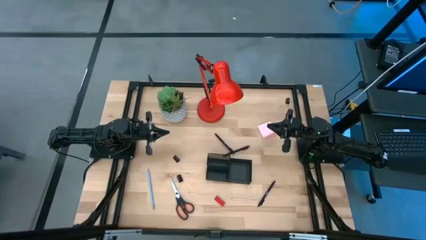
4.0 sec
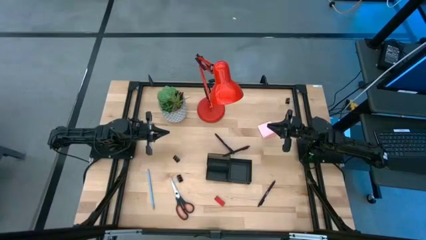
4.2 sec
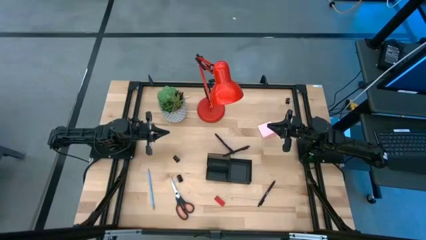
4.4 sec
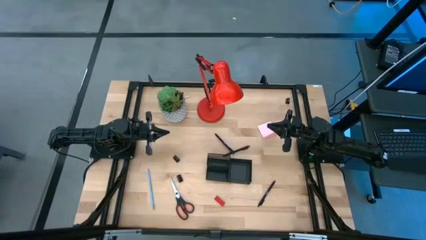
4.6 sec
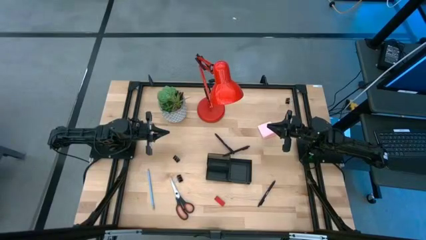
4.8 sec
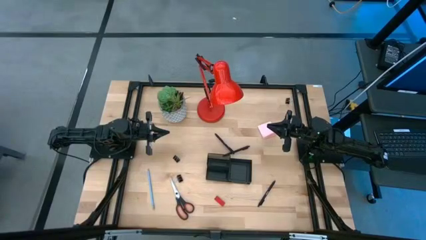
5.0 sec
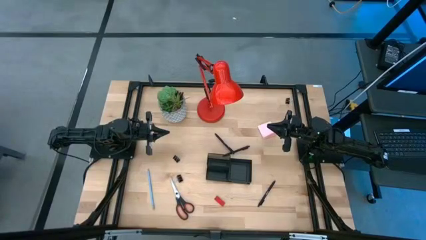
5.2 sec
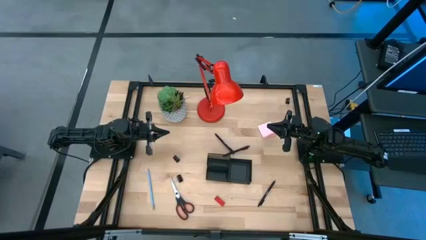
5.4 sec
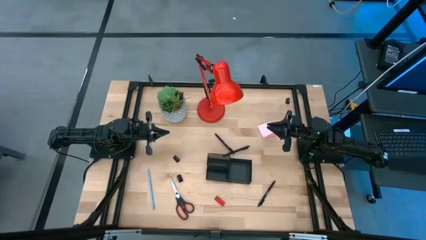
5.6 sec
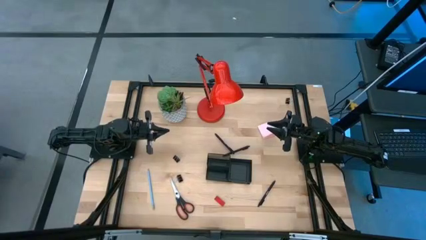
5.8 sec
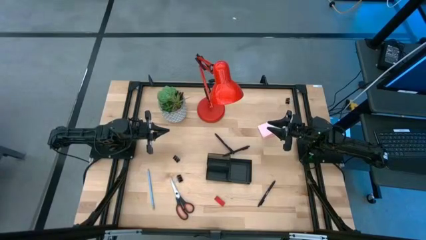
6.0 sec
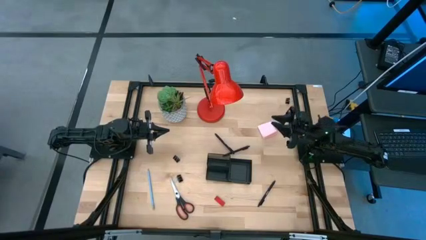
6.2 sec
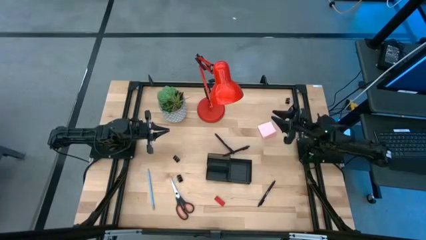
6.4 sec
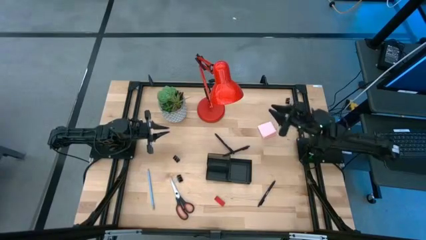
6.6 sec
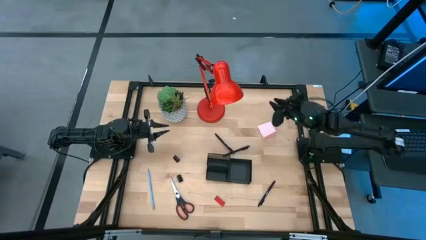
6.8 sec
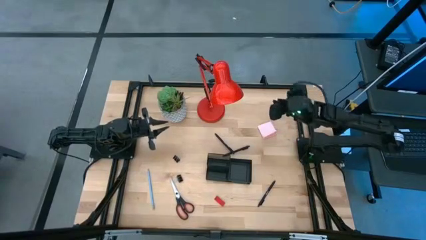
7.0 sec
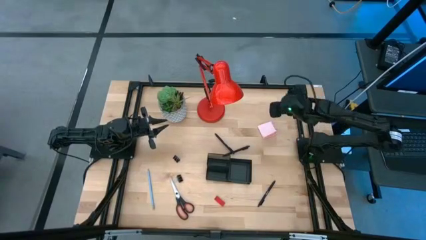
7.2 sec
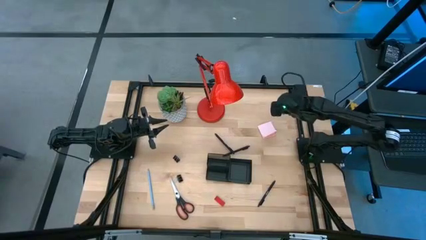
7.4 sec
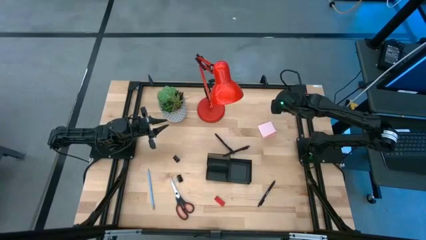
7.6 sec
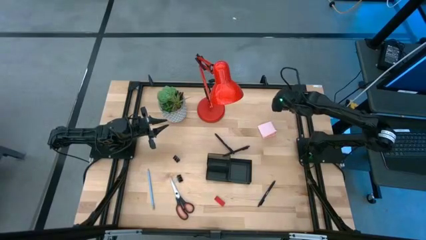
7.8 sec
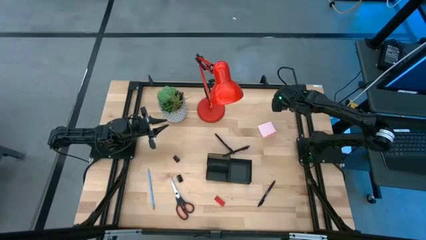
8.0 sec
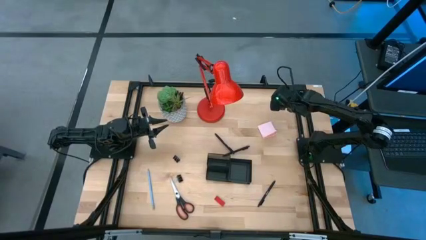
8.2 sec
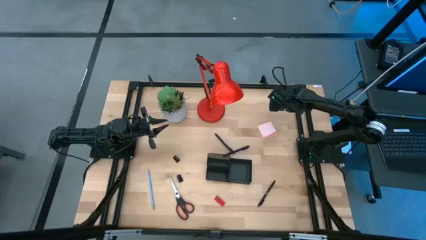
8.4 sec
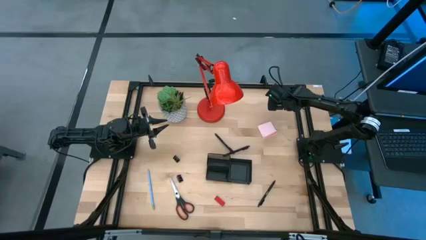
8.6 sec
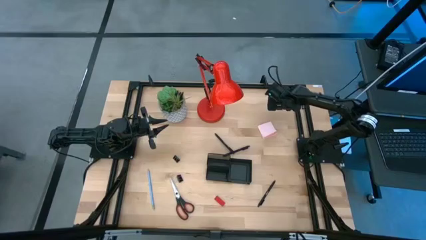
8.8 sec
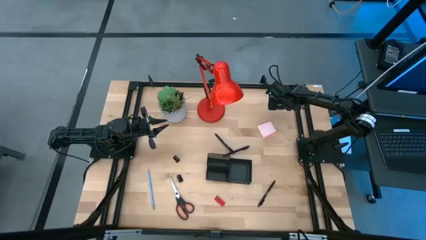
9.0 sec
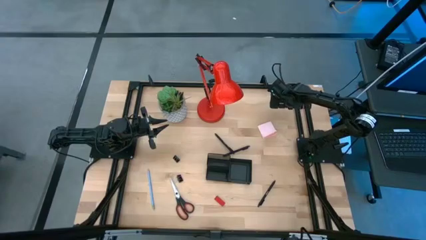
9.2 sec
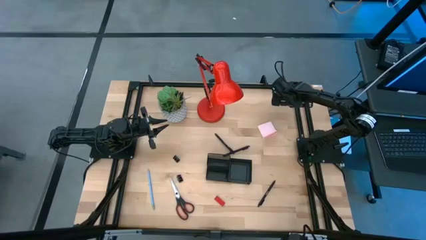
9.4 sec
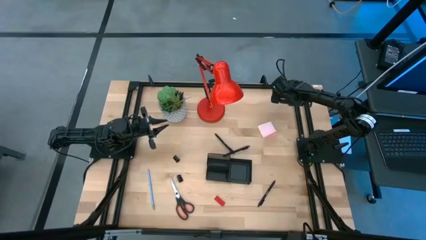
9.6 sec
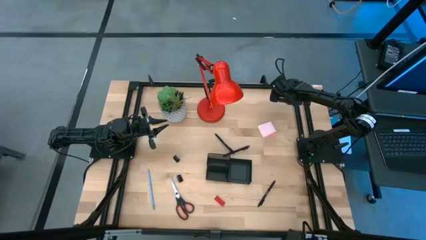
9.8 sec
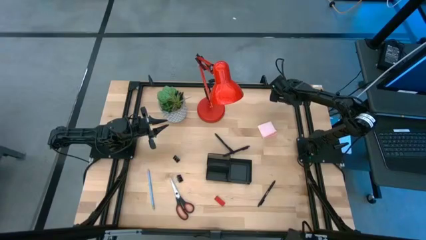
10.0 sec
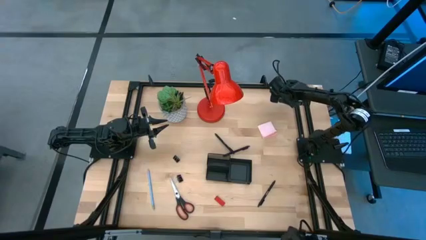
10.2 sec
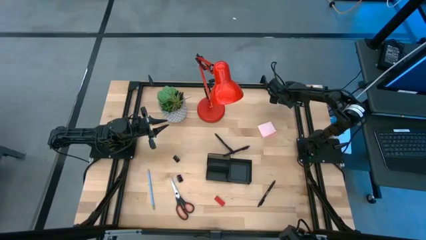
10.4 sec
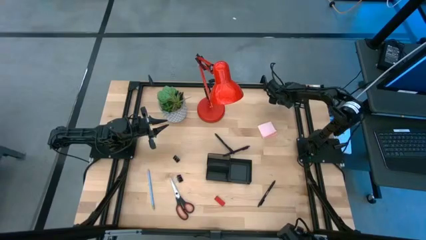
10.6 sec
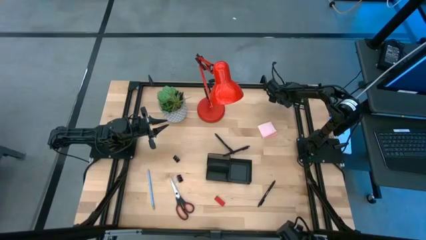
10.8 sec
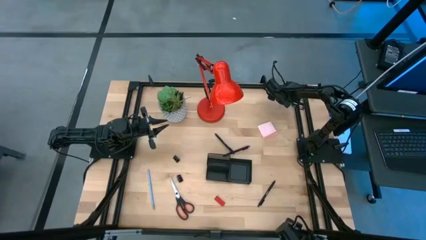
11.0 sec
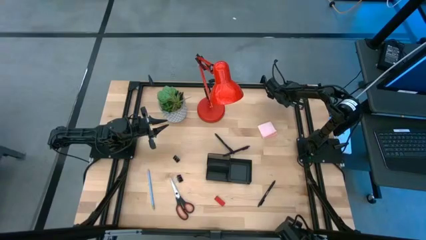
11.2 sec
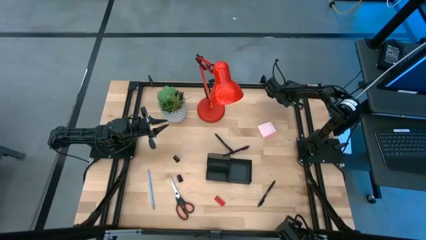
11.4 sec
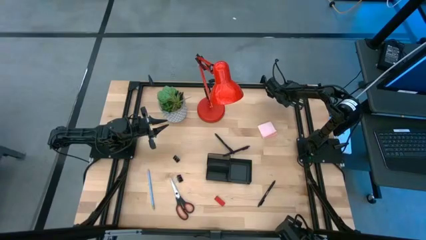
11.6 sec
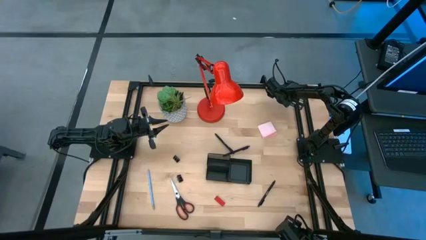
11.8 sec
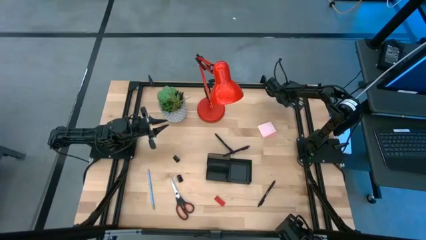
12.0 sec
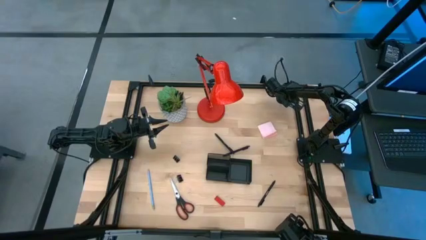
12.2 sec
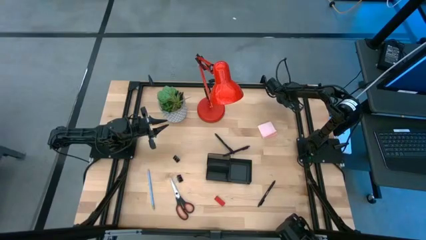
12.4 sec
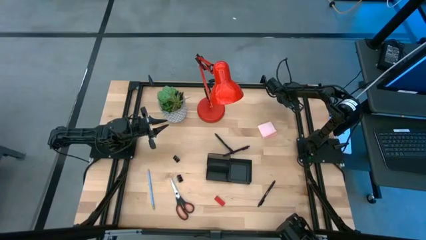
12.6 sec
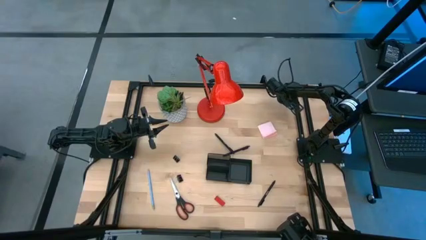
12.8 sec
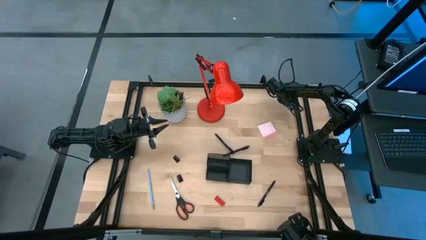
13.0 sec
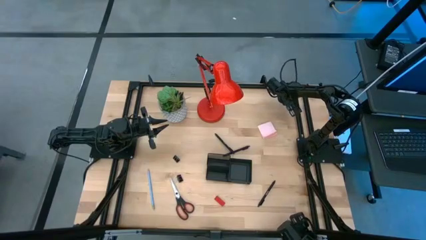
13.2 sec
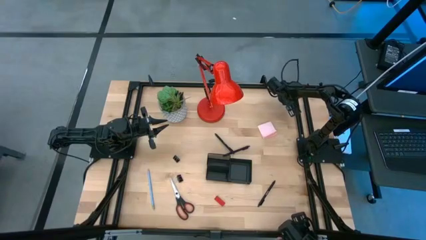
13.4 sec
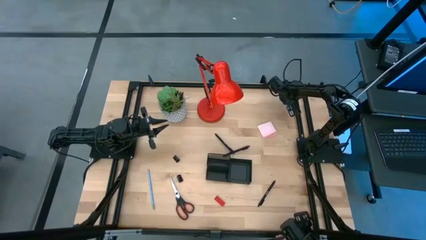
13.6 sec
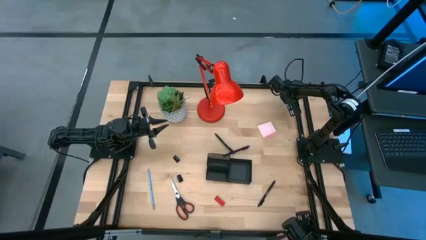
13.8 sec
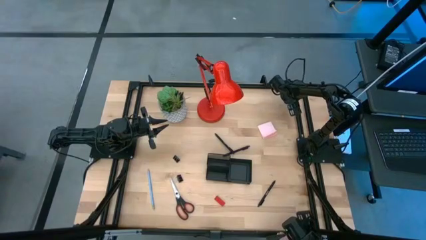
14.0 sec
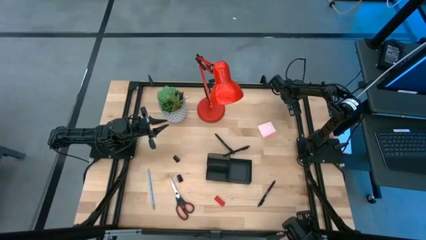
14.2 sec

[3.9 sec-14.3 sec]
Task: Pick and place office supplies into organizer
Put the top black binder clip into the black desk organizer

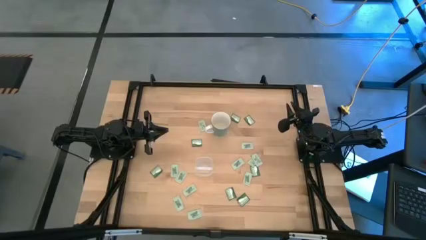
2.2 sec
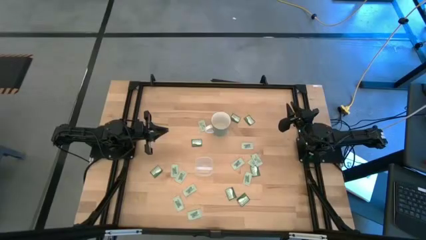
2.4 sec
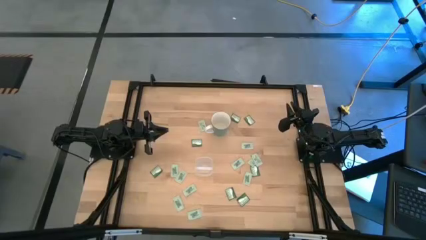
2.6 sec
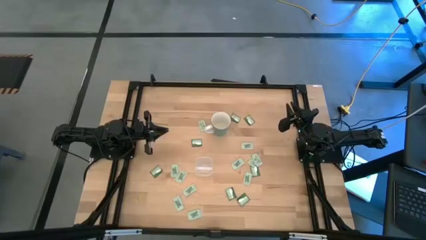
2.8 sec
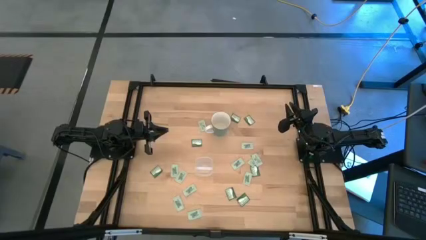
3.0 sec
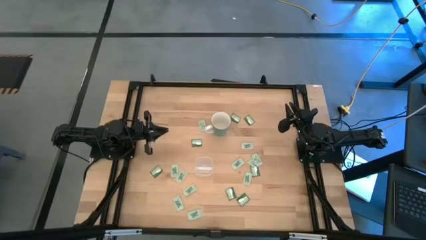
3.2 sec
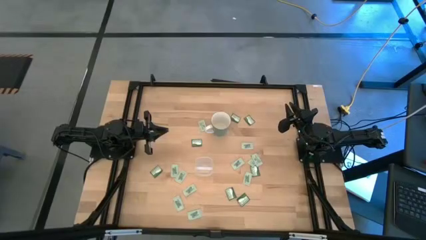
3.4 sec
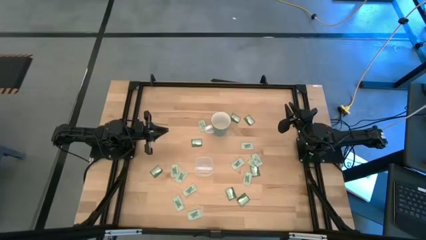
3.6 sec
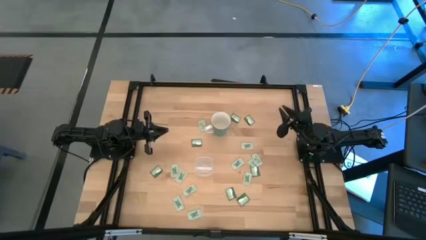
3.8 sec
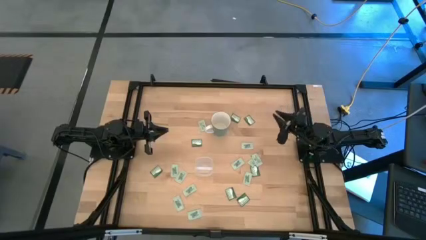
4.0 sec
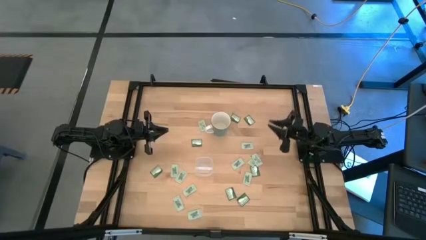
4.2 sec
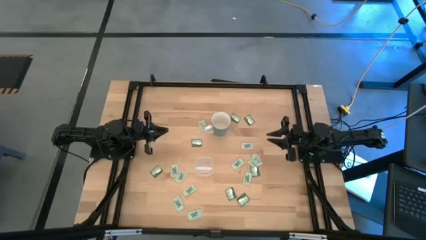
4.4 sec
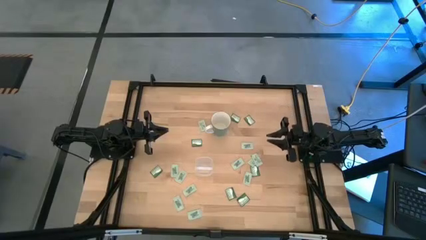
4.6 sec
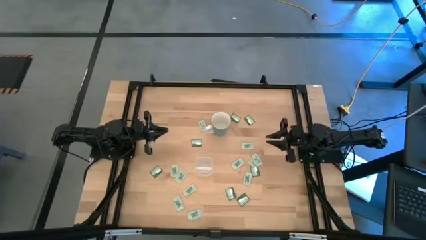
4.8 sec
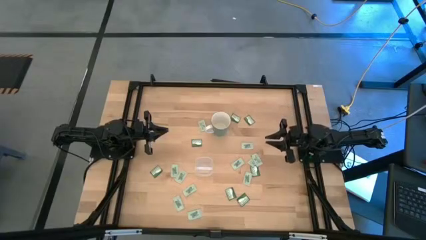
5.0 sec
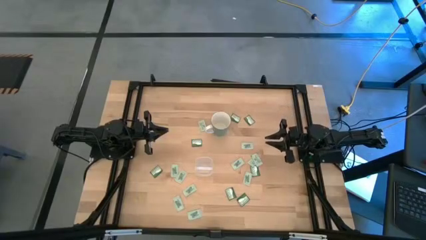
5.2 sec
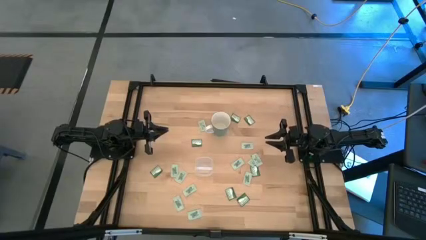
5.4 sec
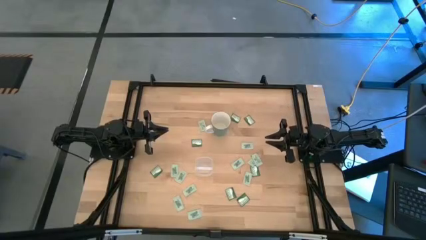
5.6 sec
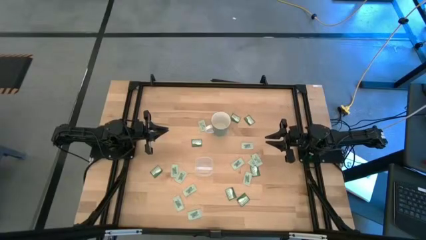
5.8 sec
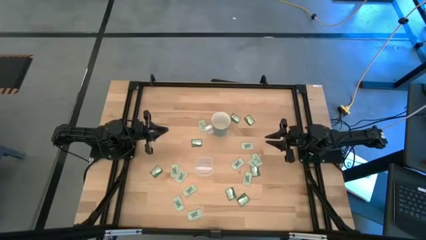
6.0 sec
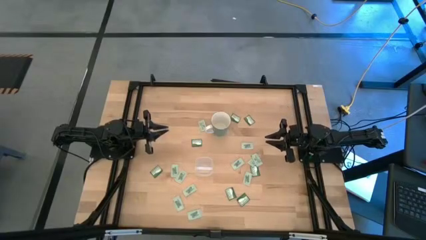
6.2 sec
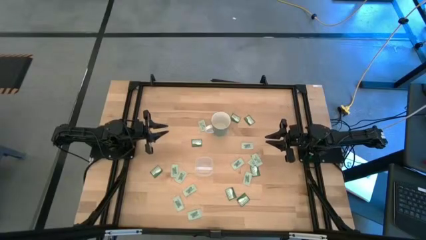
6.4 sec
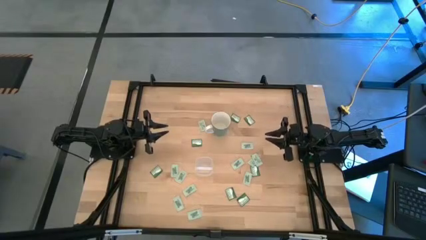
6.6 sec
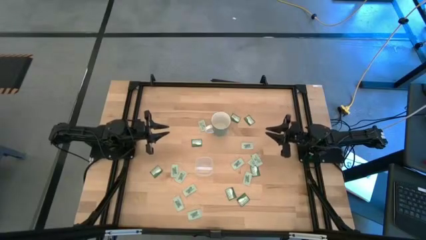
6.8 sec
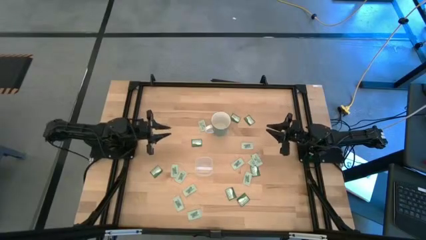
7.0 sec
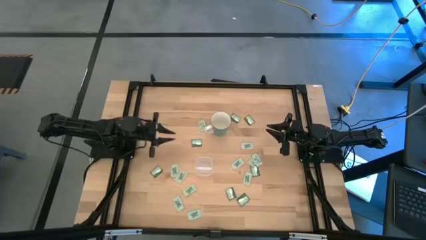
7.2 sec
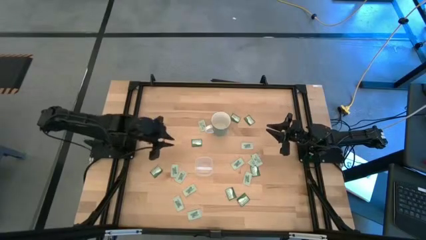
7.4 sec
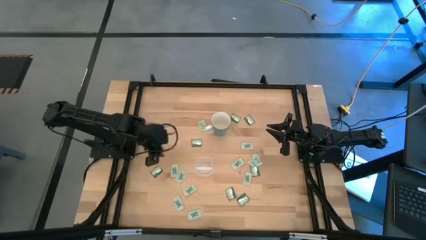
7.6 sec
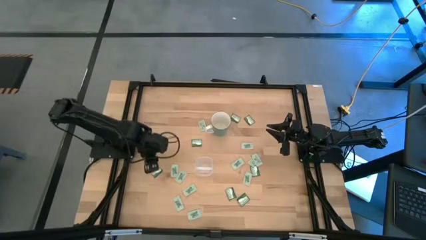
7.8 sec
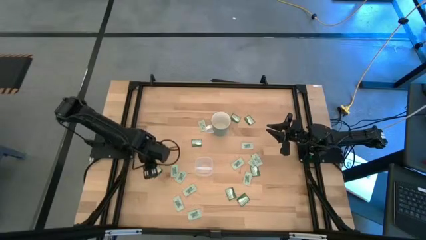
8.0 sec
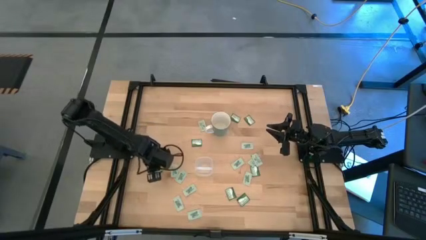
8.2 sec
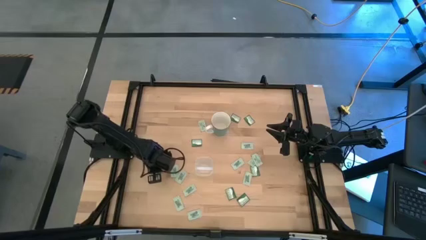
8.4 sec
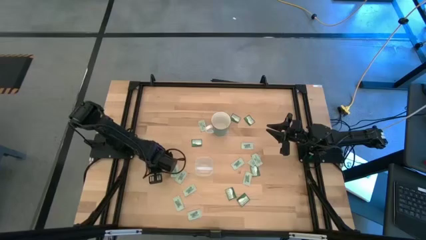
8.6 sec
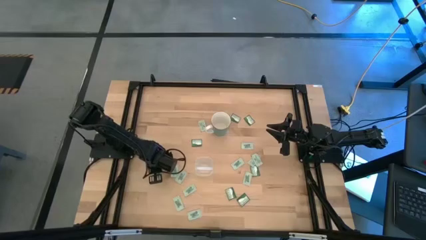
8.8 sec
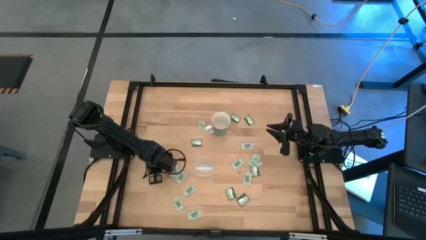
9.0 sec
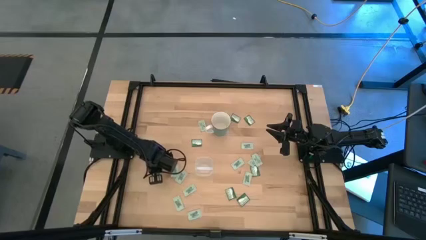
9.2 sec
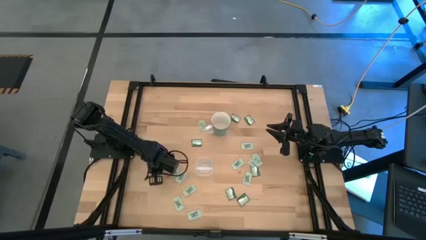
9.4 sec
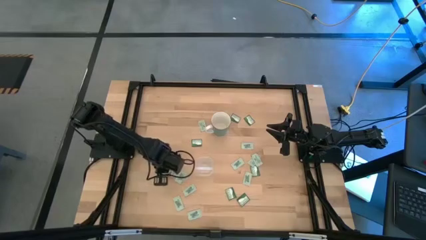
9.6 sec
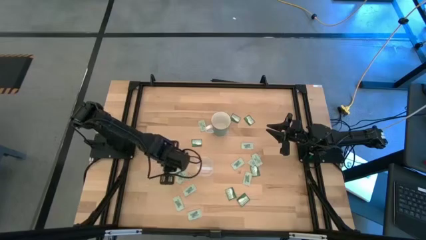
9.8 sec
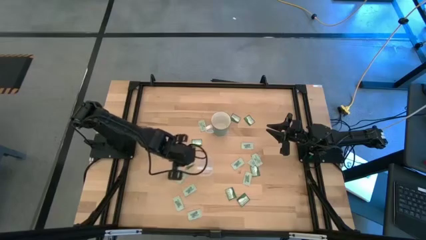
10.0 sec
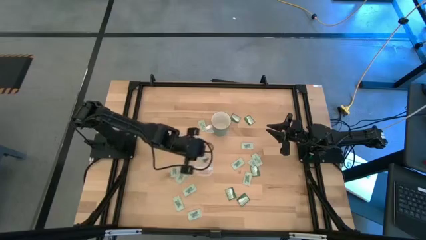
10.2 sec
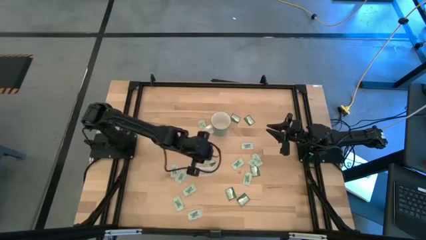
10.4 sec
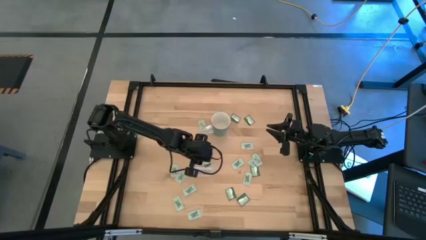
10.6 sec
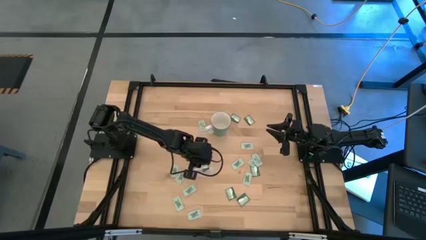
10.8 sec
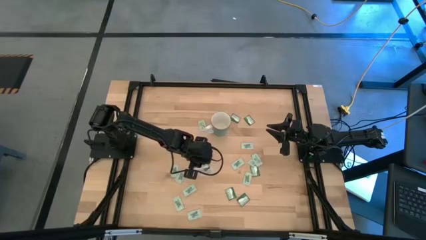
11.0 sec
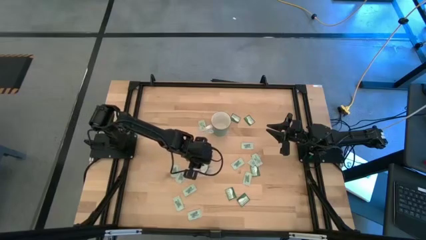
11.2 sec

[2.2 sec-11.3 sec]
Task: Pick and place Stevia / Truvia into bins
Put the green stevia packet into the transparent bin
